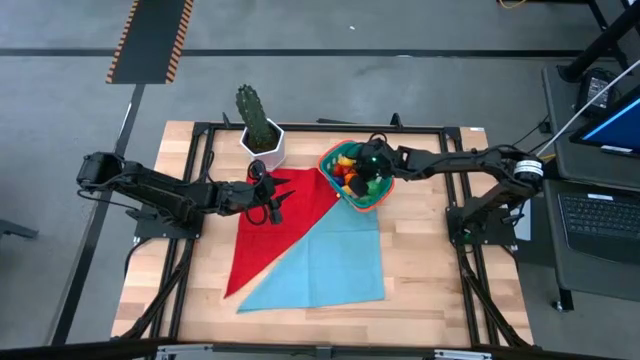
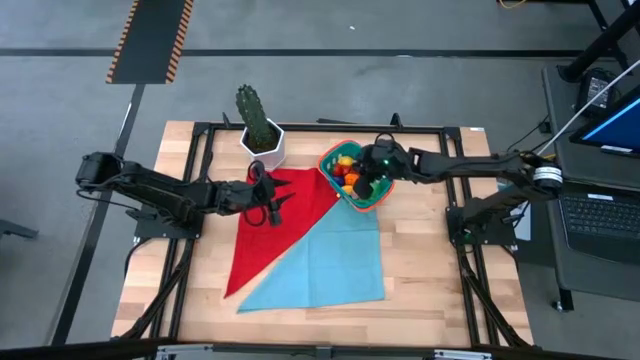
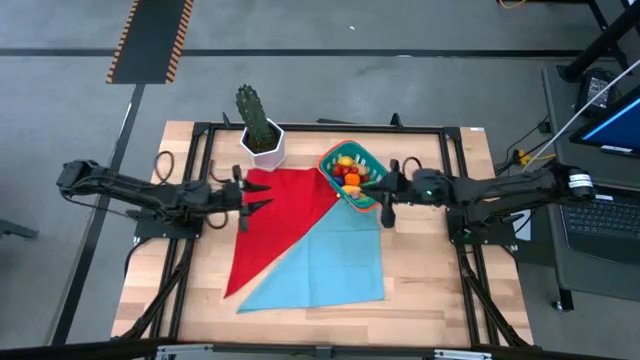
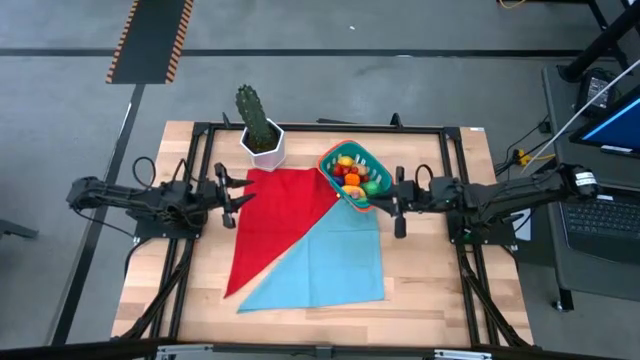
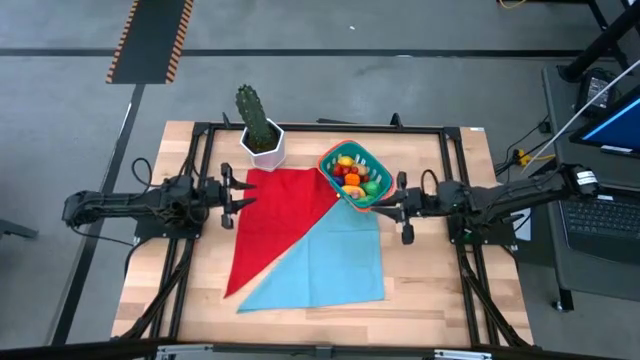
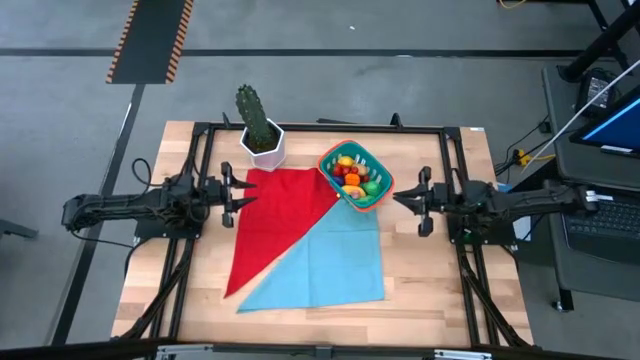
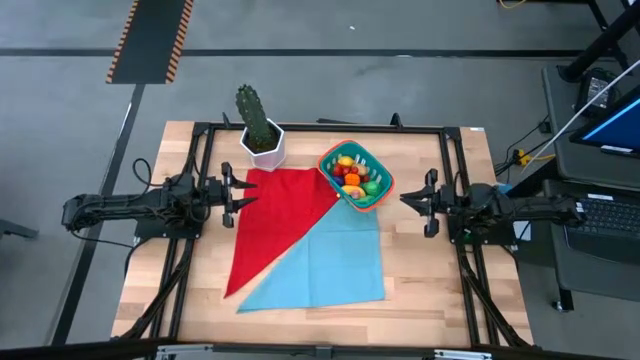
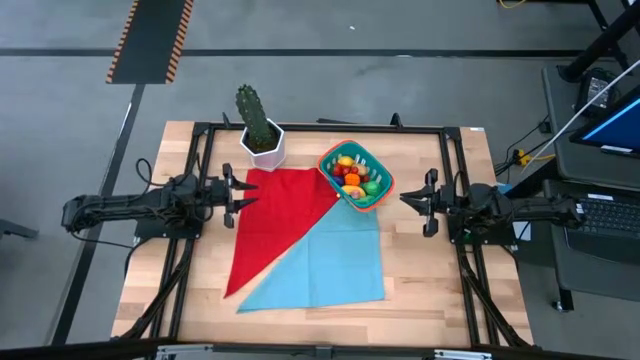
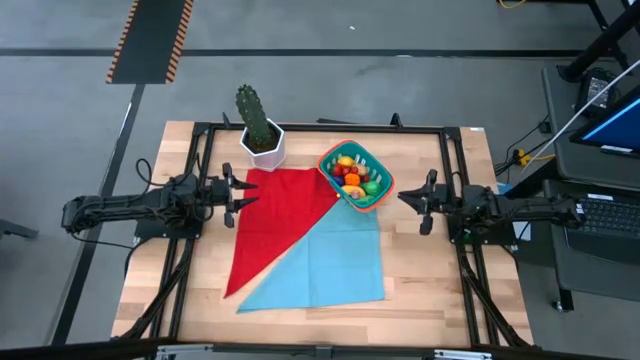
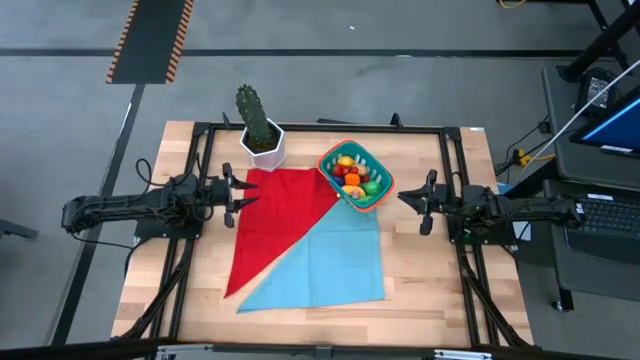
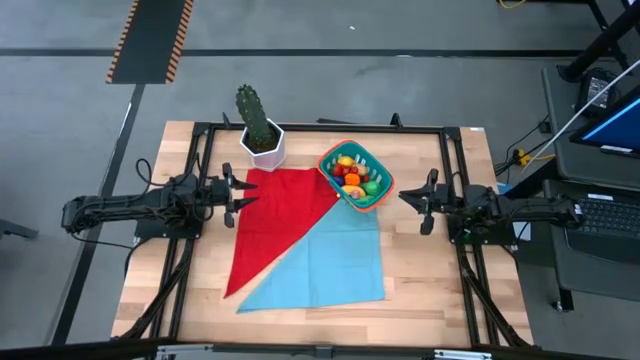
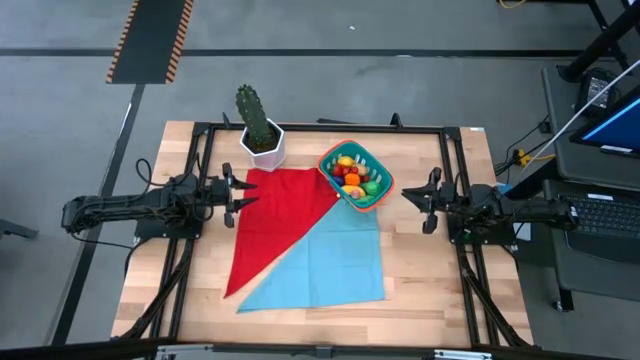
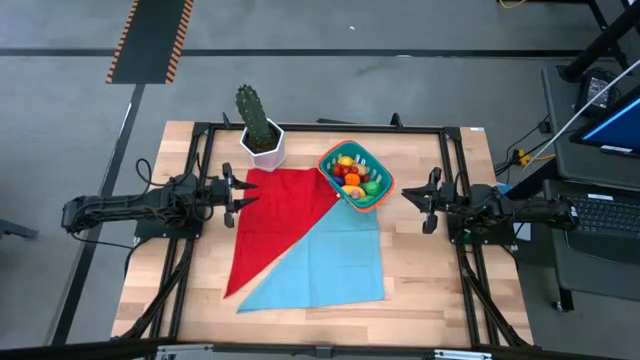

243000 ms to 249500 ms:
Task: Build produce basket
Return to Home Position

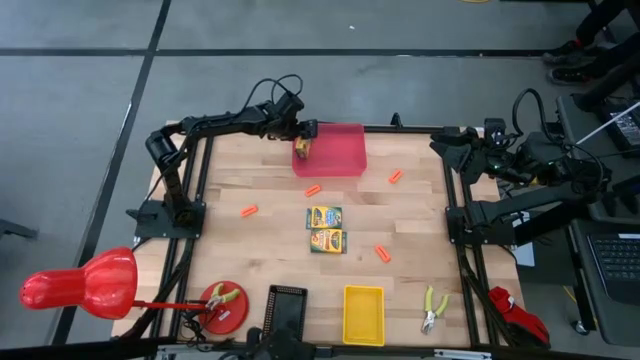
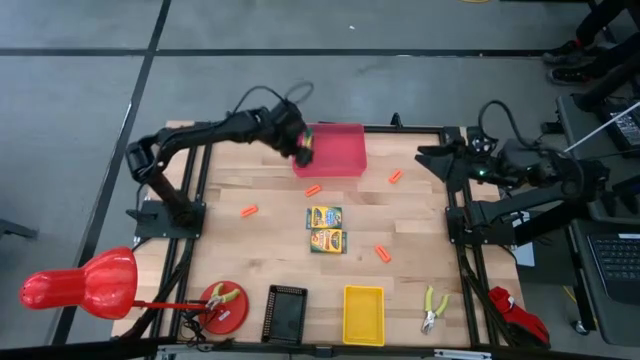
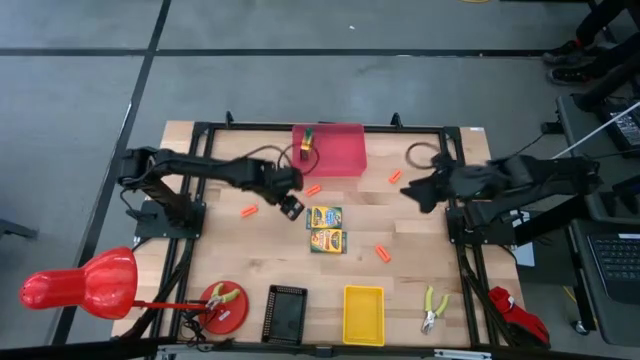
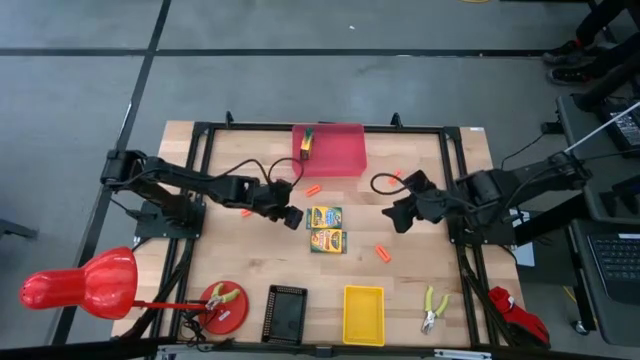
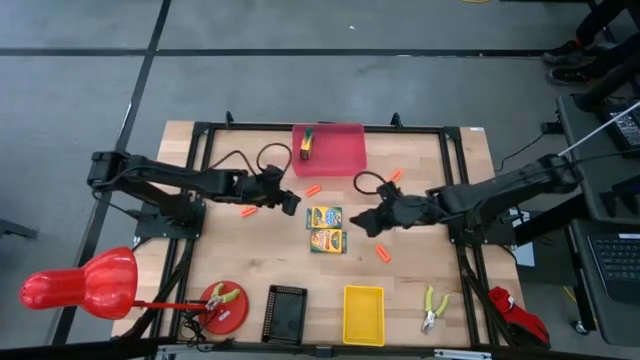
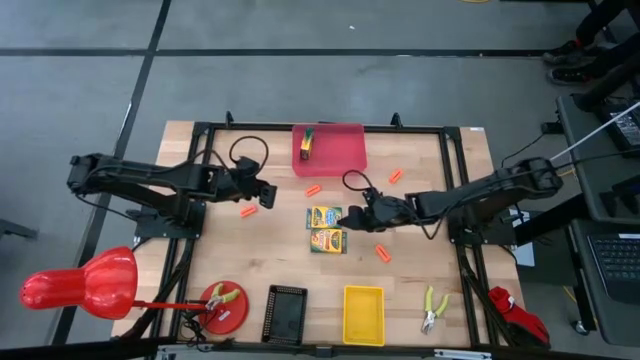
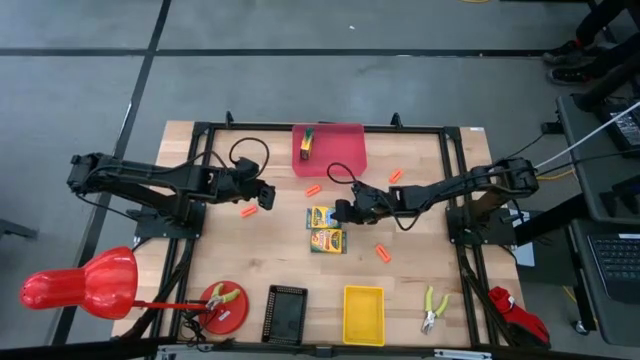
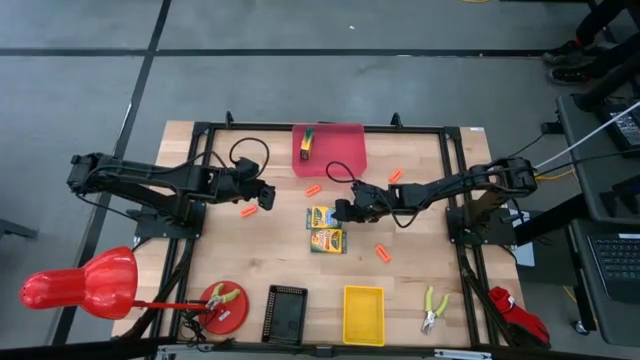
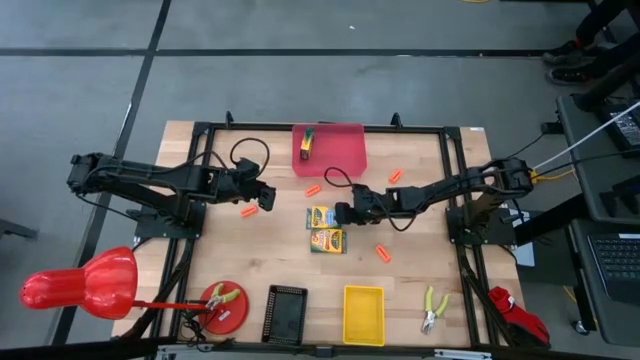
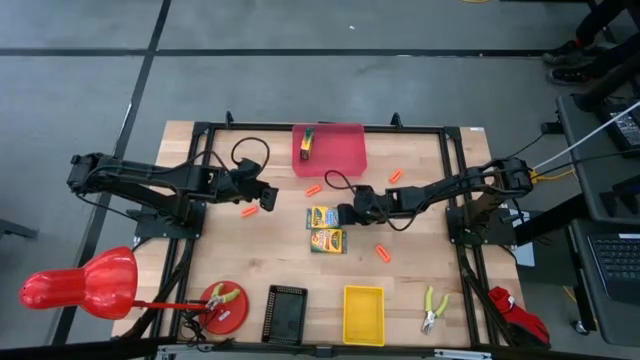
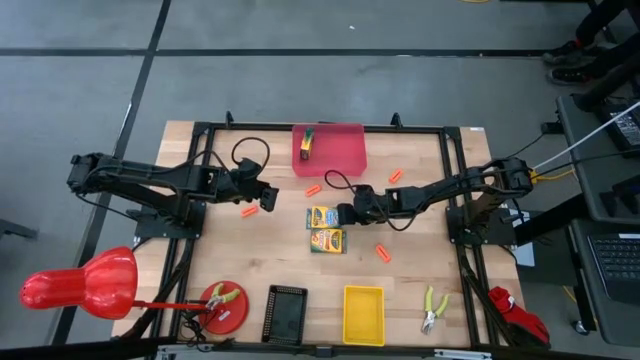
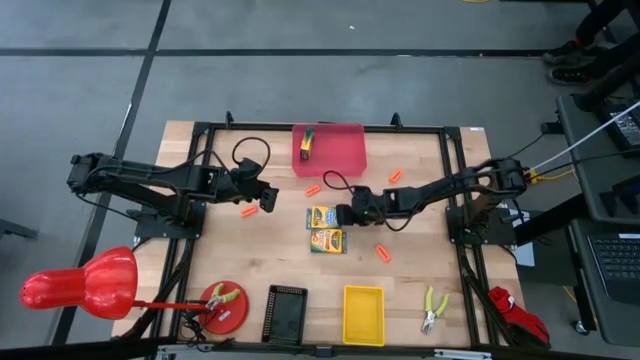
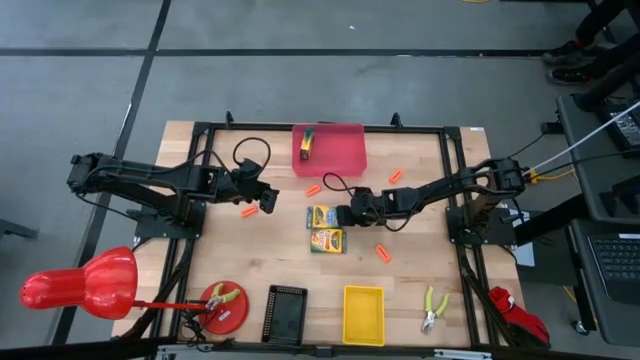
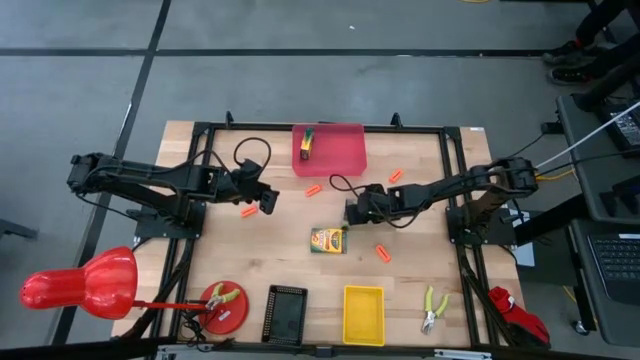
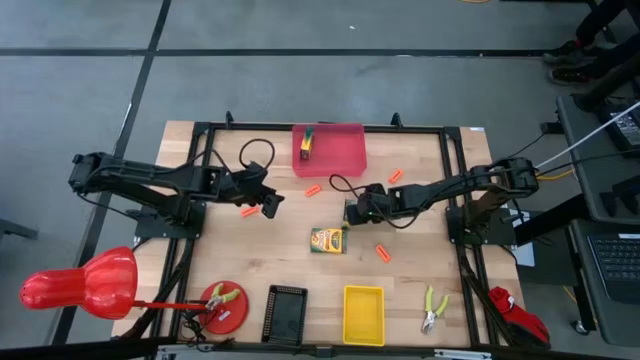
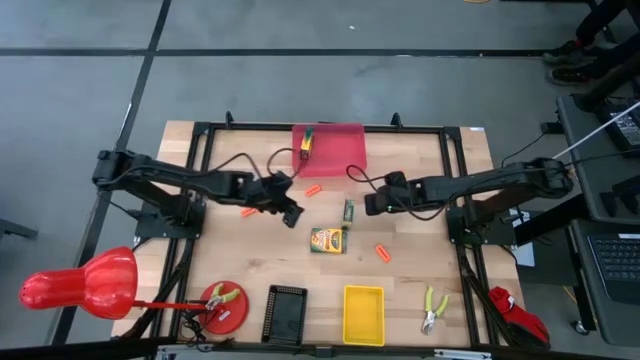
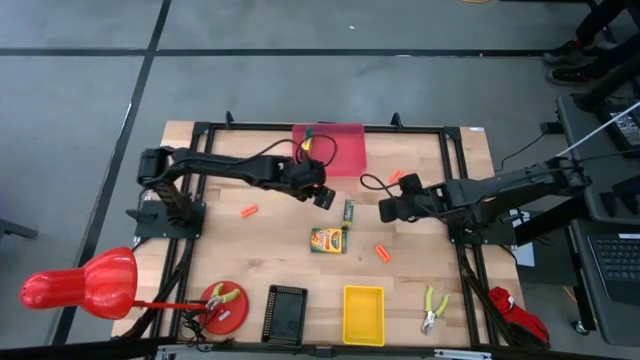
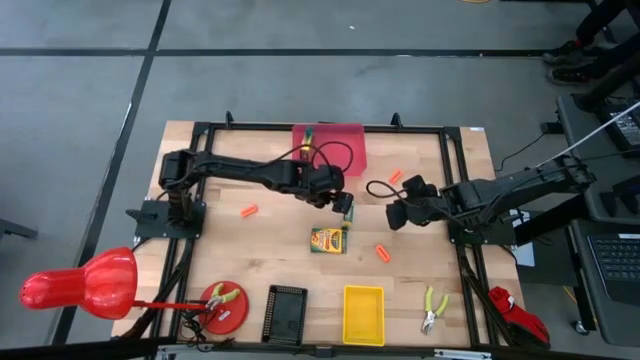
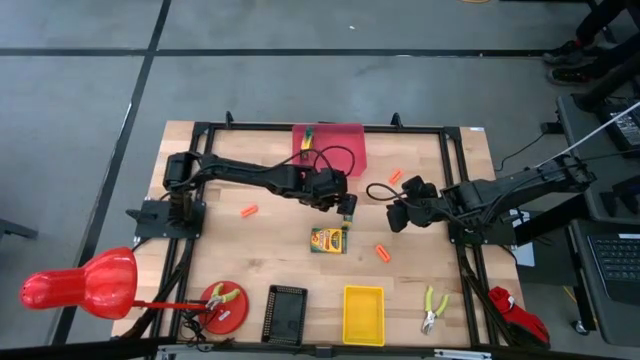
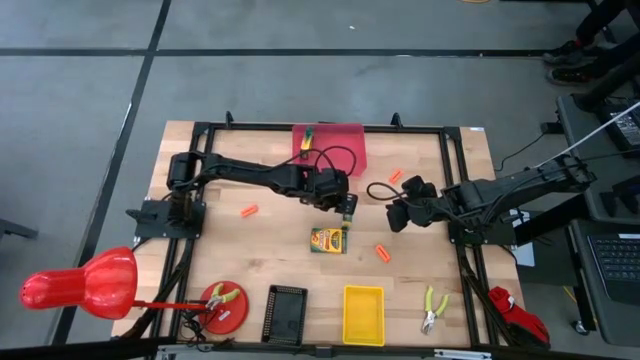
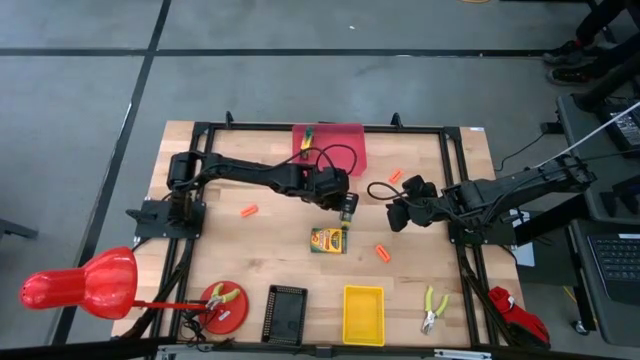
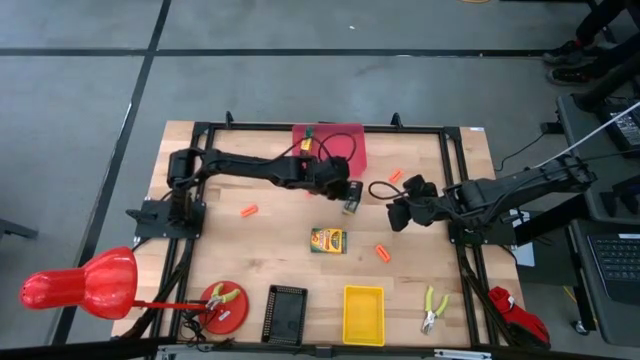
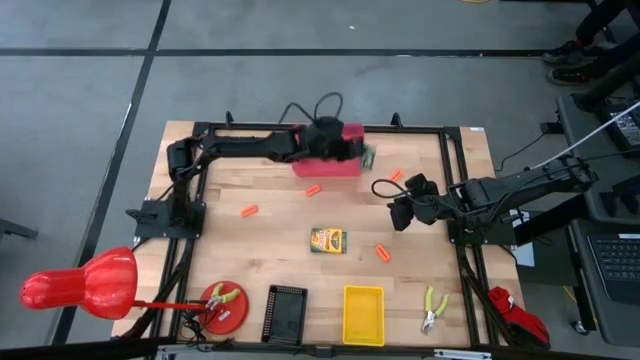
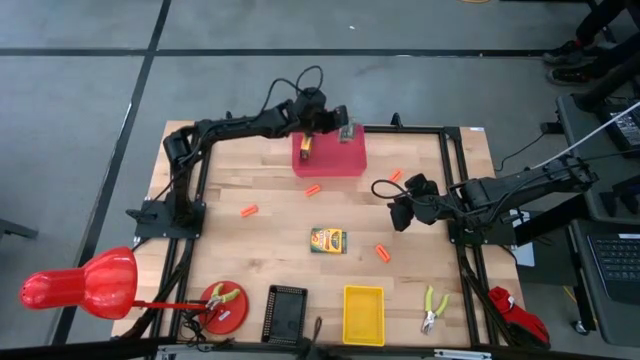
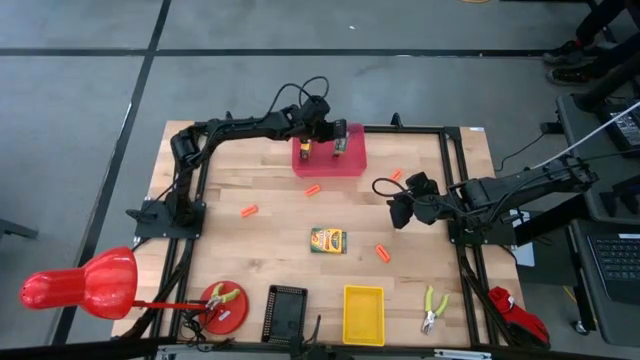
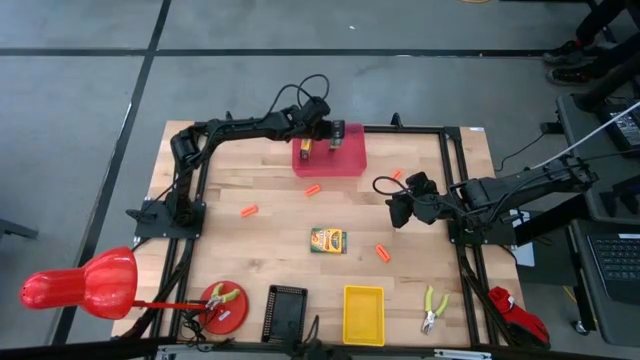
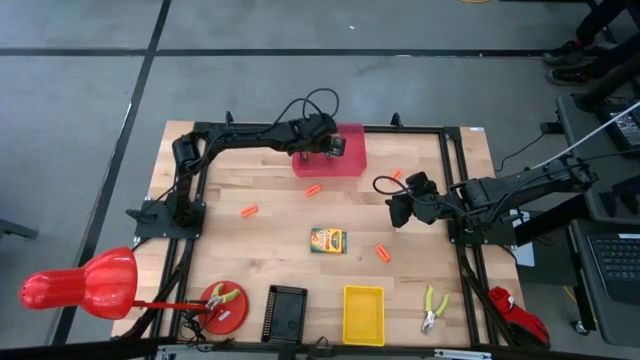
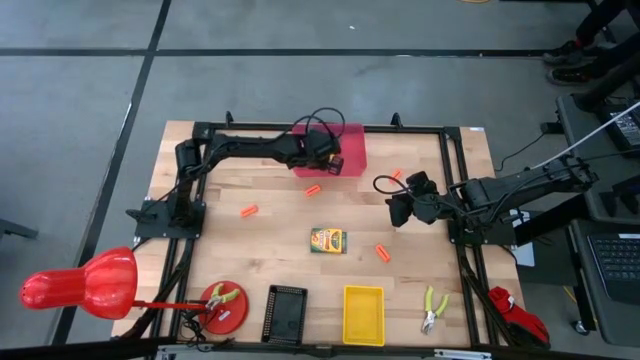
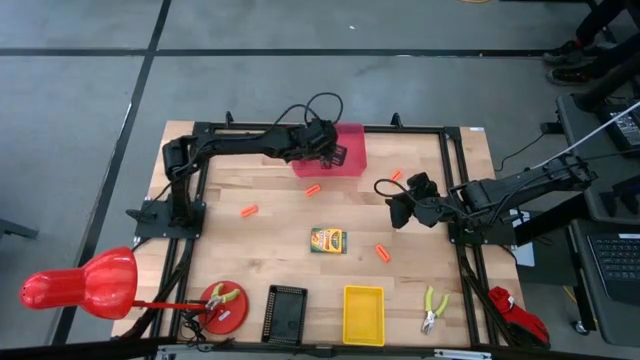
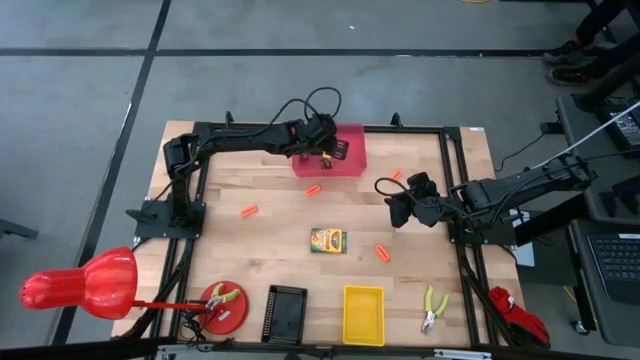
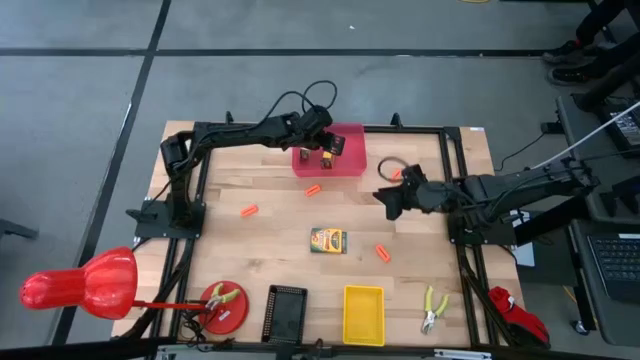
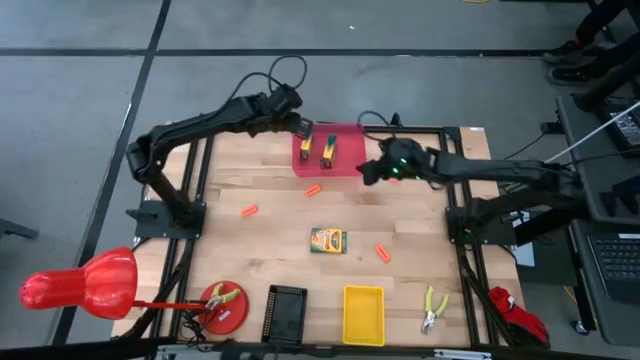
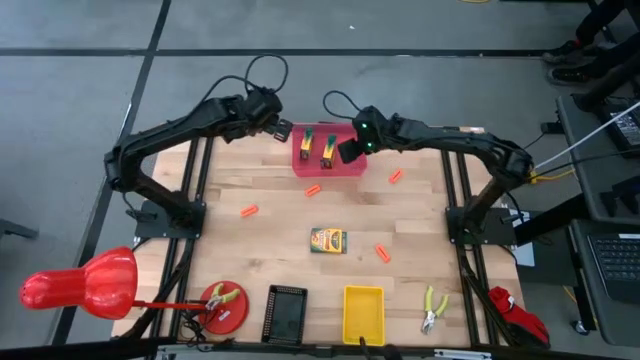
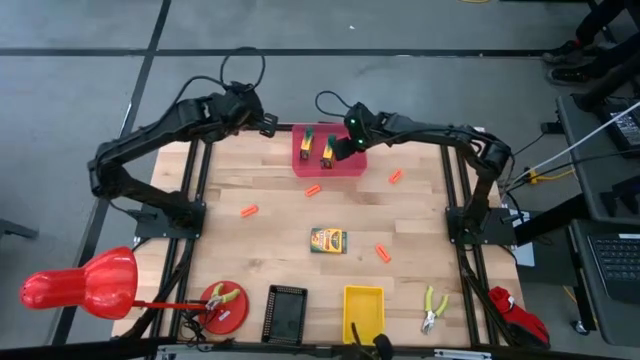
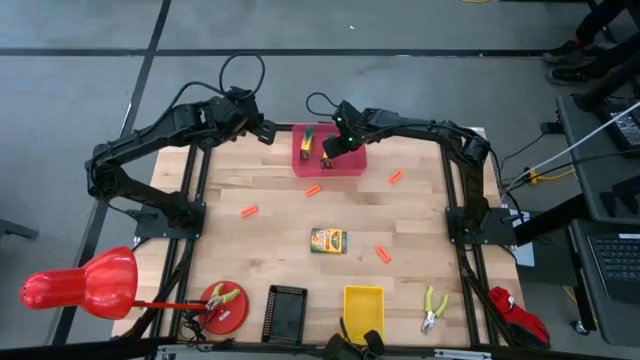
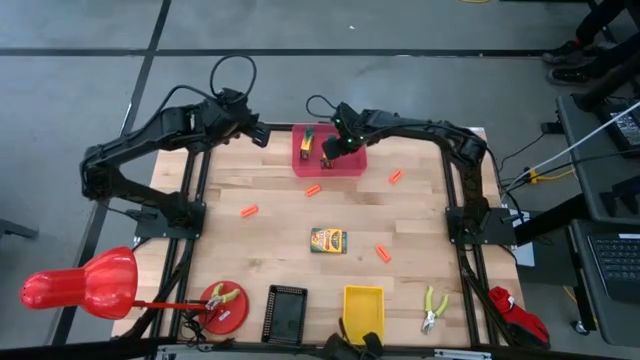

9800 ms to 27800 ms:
Task: Pick & Place School Supplies
Put the yellow crayon box into the red bin
